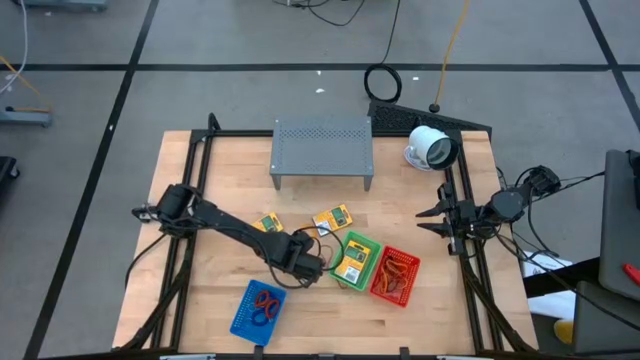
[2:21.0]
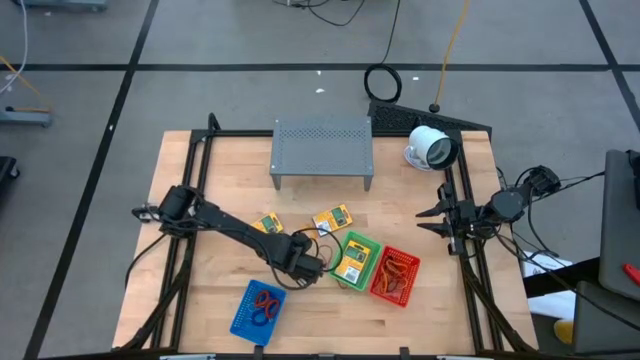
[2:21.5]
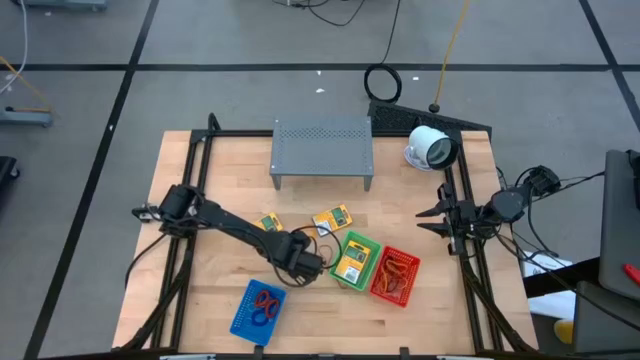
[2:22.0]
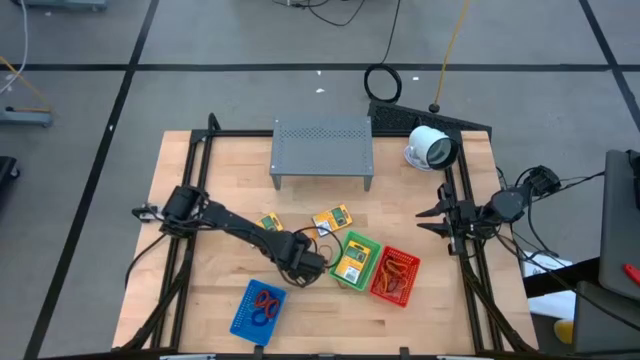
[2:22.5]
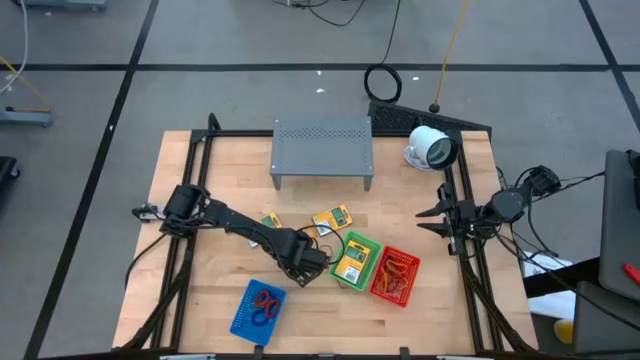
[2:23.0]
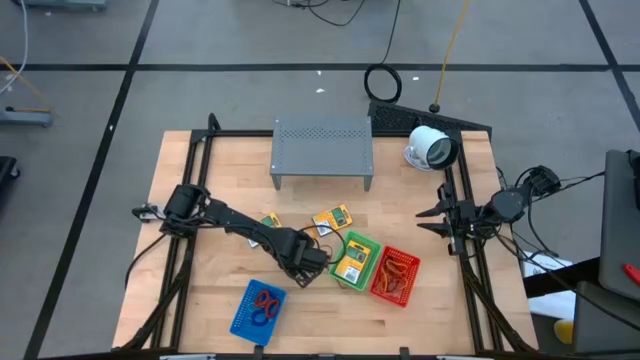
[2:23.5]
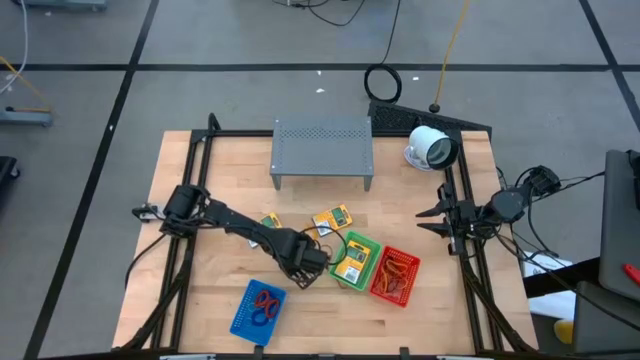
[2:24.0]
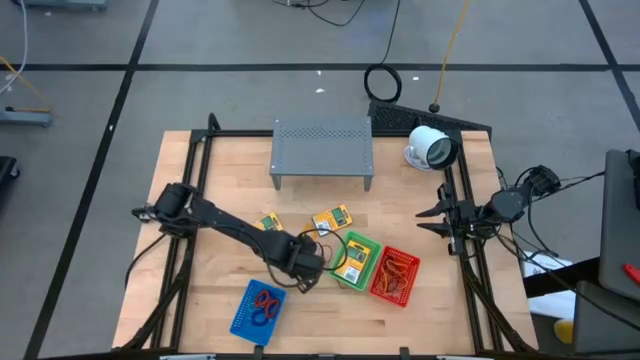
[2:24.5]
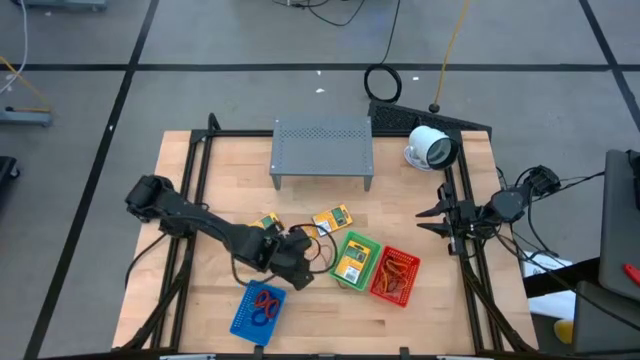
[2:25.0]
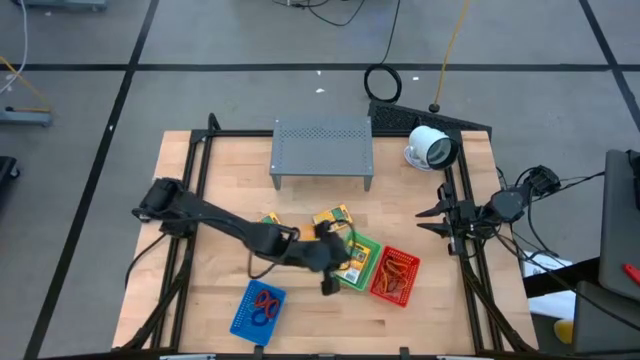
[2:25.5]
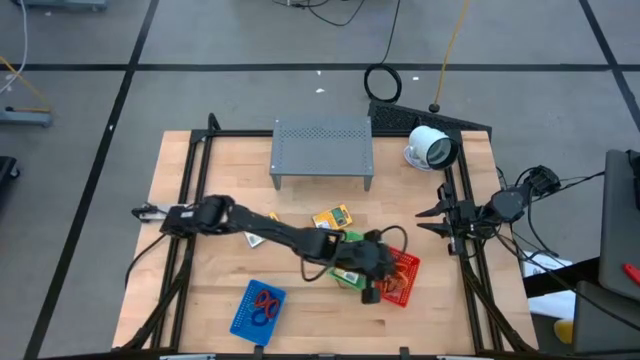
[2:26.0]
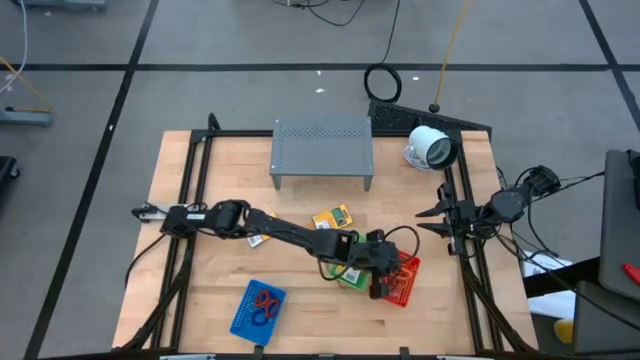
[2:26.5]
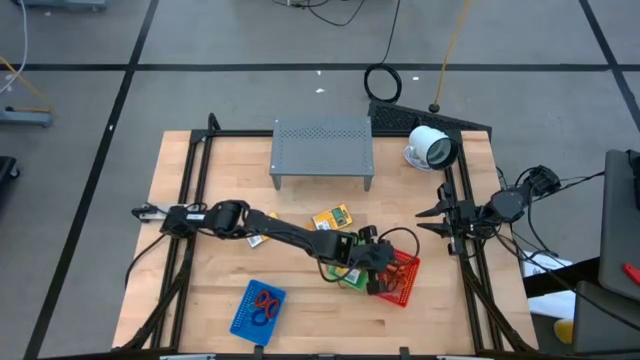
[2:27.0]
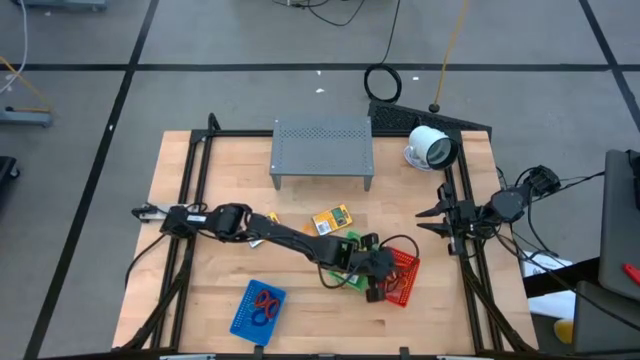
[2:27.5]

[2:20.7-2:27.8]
Task: Pick & Place Office Desk Supplies
Put the orange rubber band into the red bin

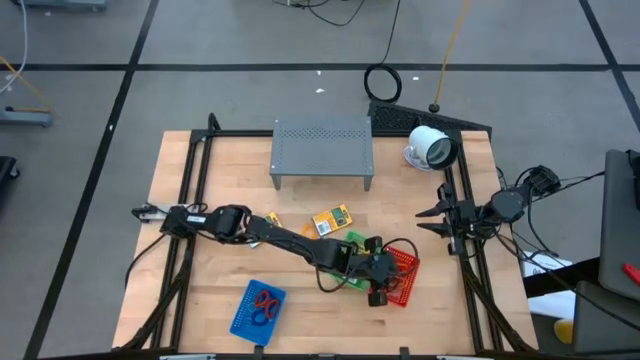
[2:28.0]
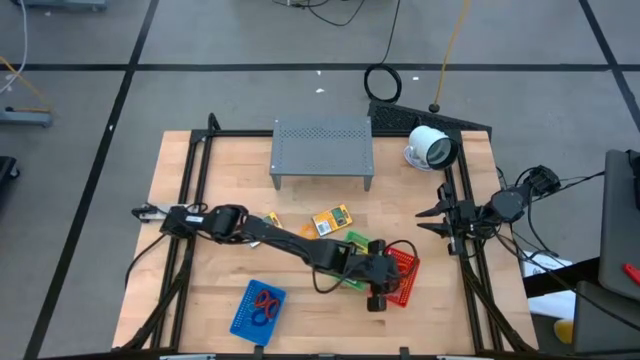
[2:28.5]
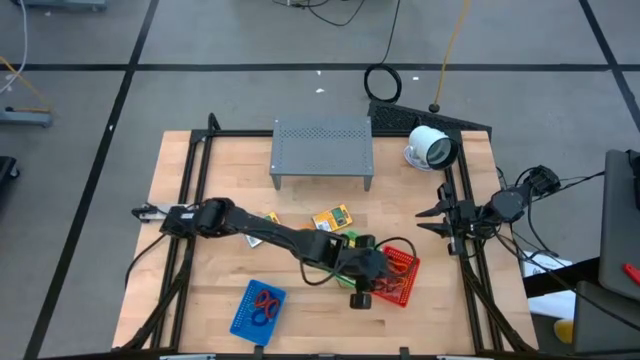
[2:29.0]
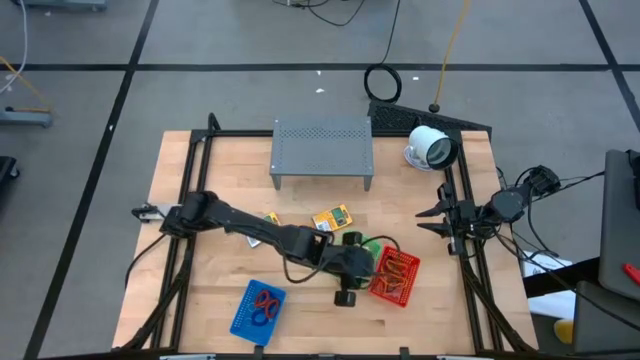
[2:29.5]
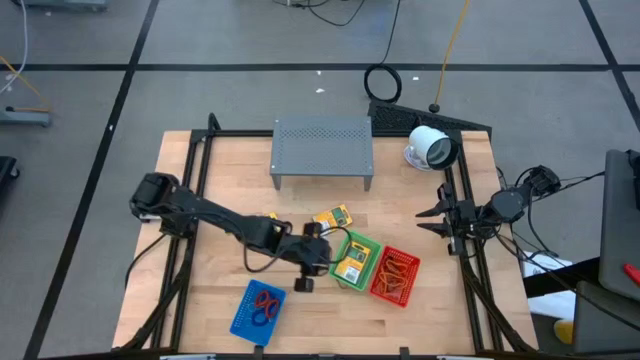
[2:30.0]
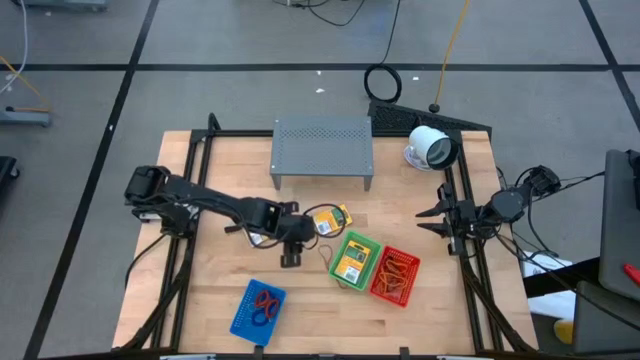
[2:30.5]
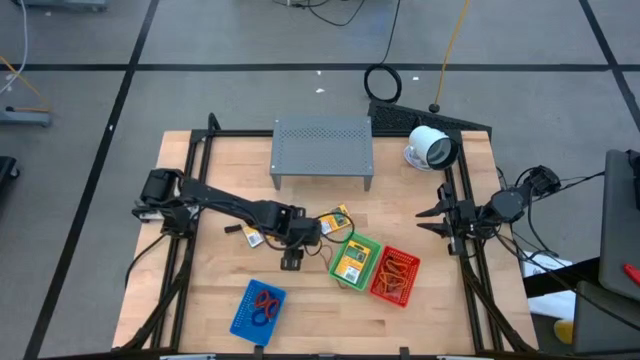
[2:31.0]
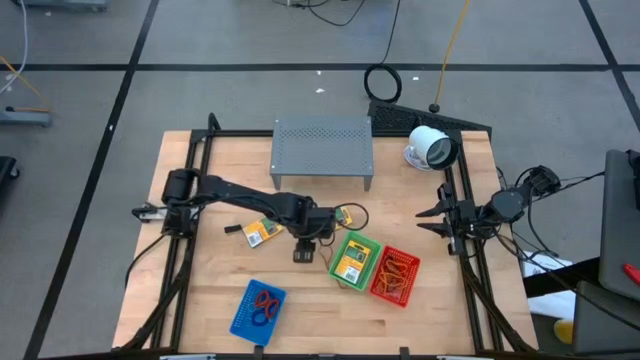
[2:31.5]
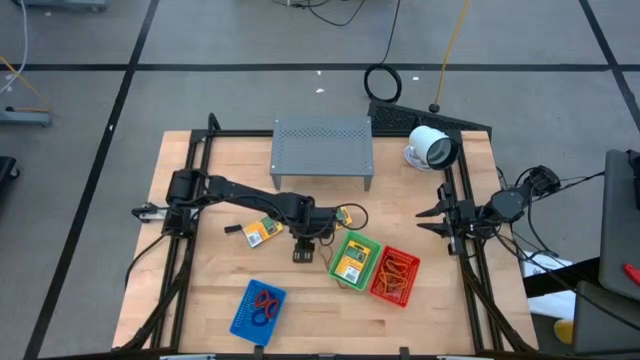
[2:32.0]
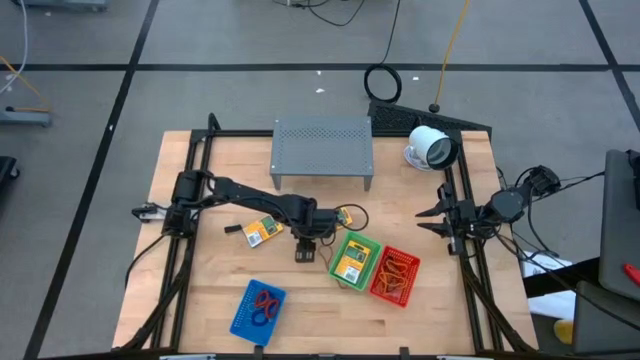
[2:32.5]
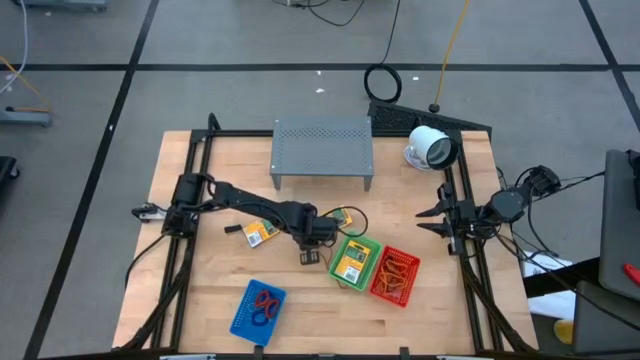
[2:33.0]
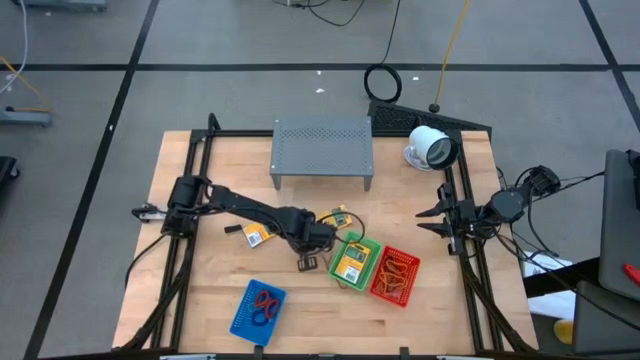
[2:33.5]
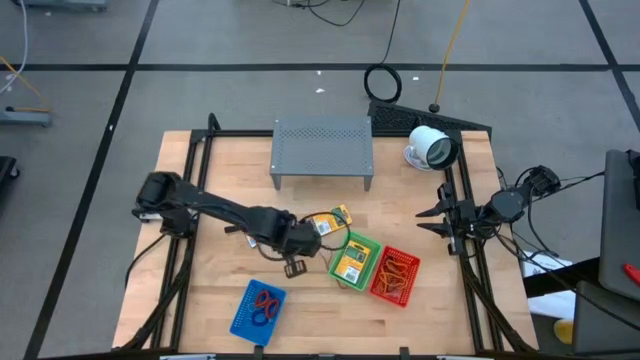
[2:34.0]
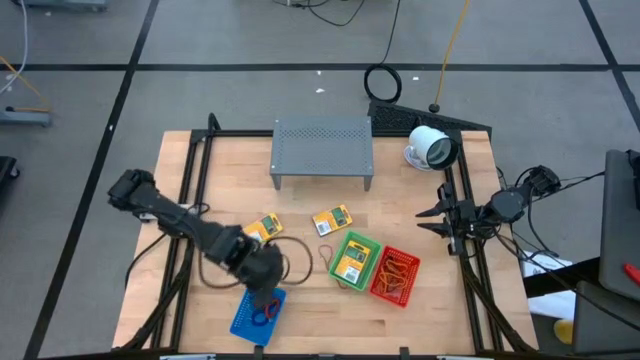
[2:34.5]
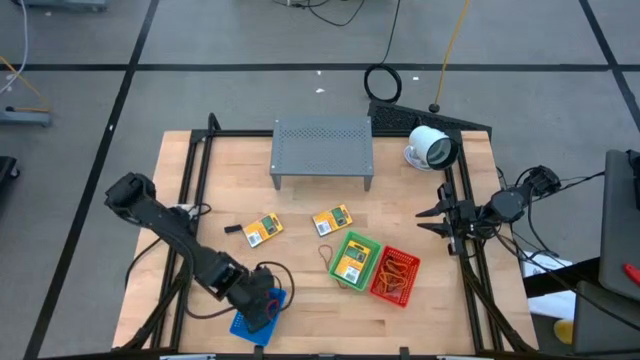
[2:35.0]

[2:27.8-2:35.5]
Put the yellow spring rubberband band into the blue bin

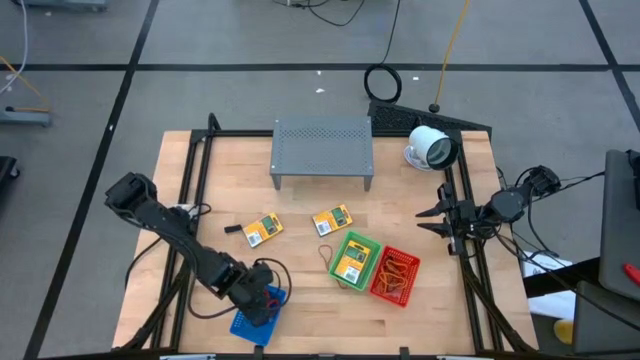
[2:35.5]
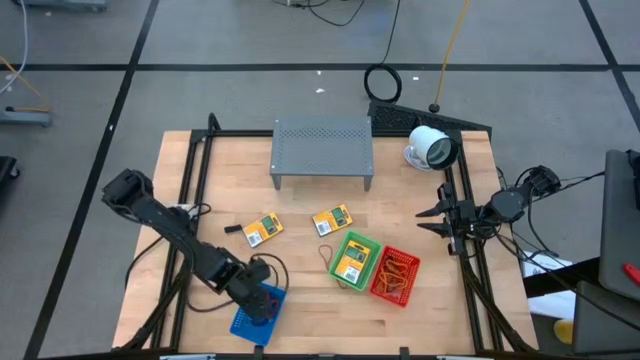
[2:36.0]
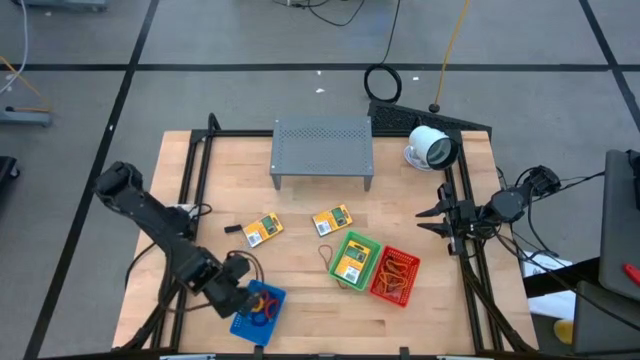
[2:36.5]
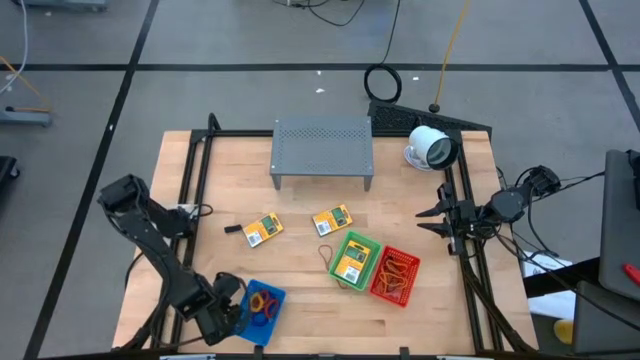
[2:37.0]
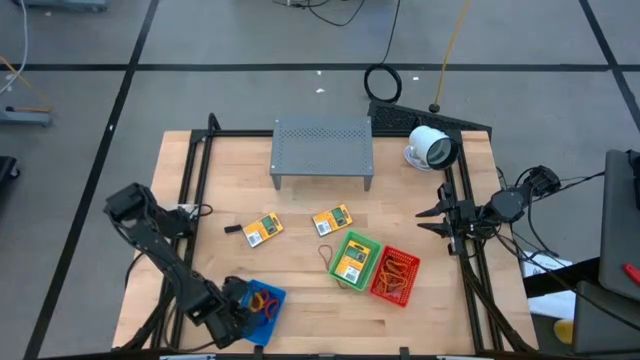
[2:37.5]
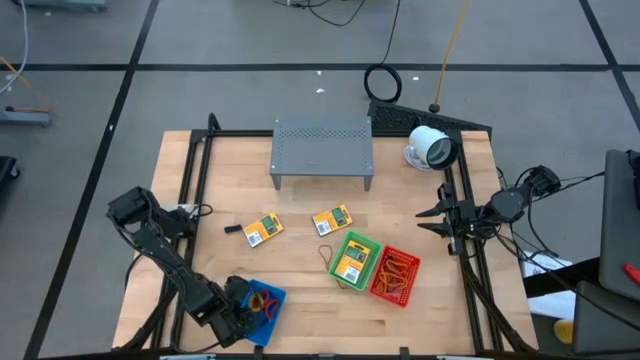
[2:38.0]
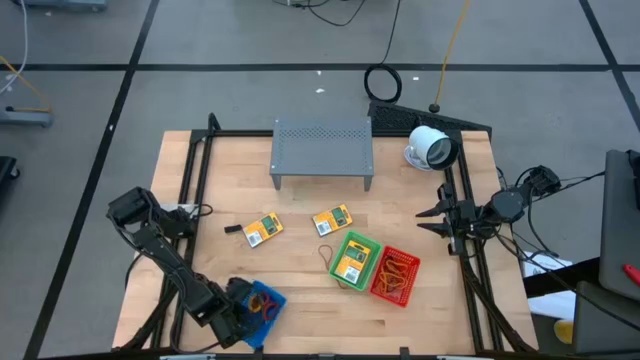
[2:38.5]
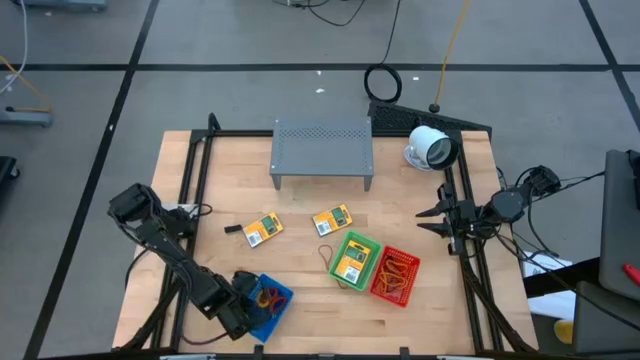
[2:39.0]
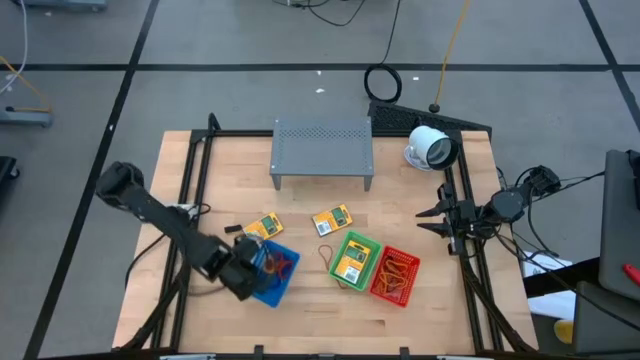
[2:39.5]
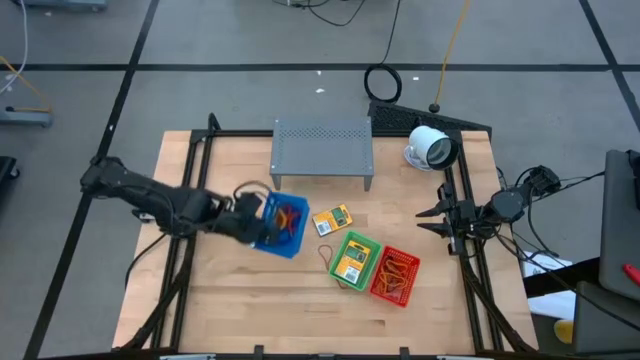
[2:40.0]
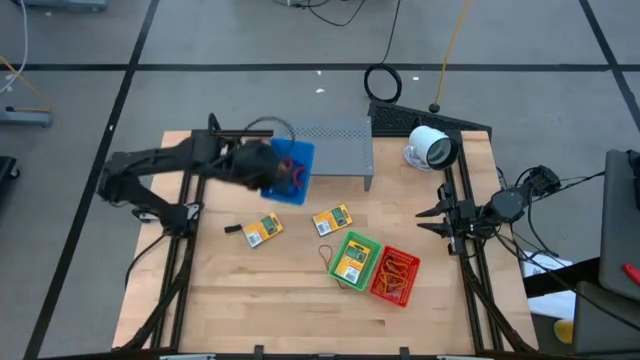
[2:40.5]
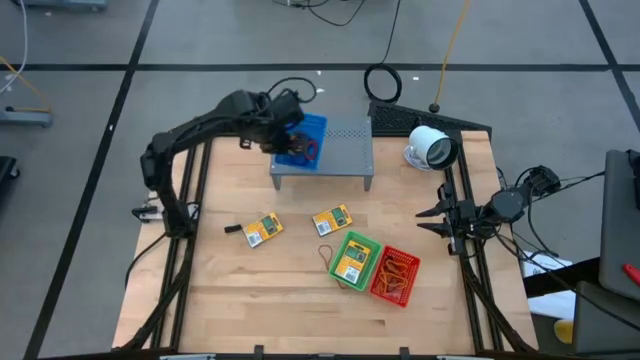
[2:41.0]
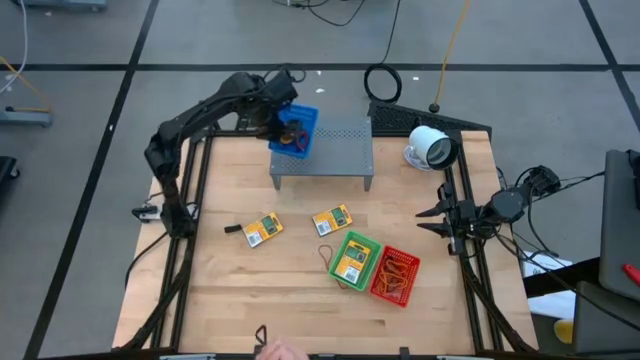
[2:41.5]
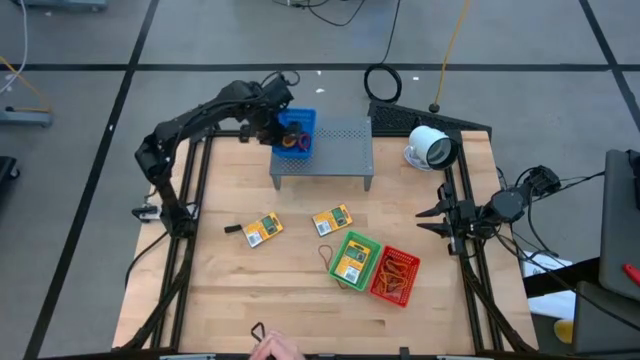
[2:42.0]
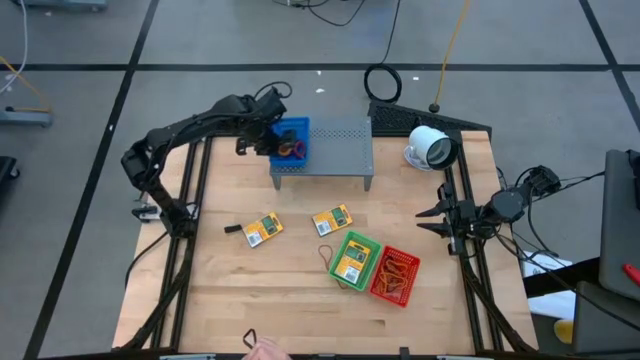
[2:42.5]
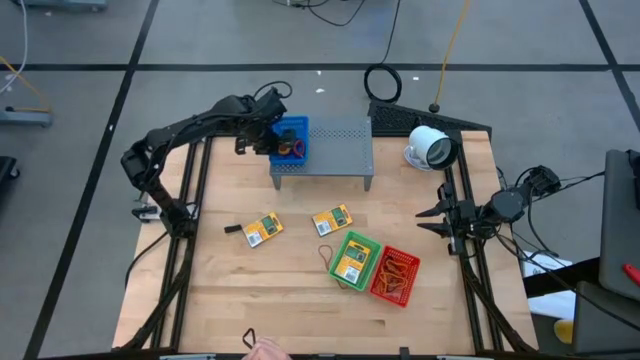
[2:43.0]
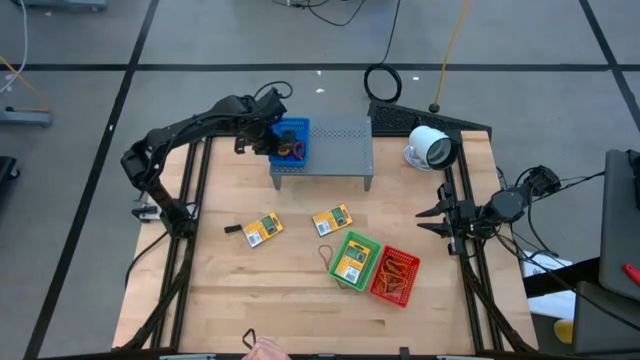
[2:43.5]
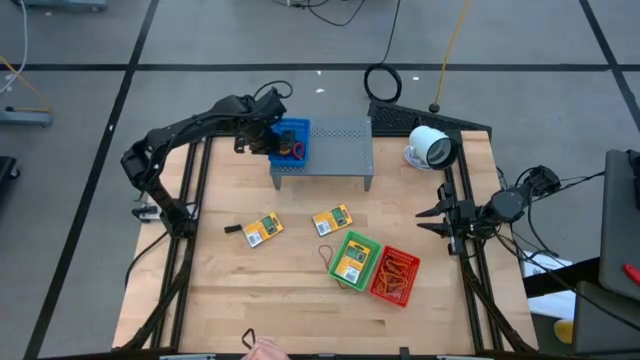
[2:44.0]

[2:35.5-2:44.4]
Put the blue bin on the shelf
